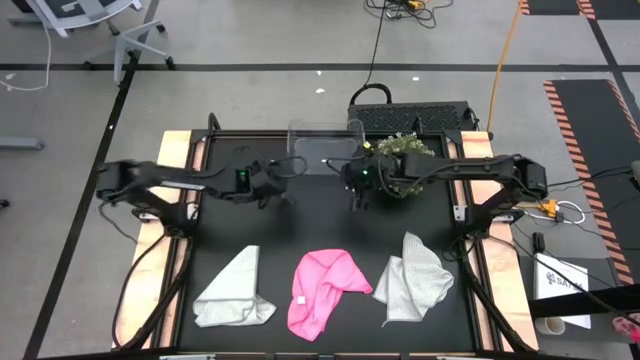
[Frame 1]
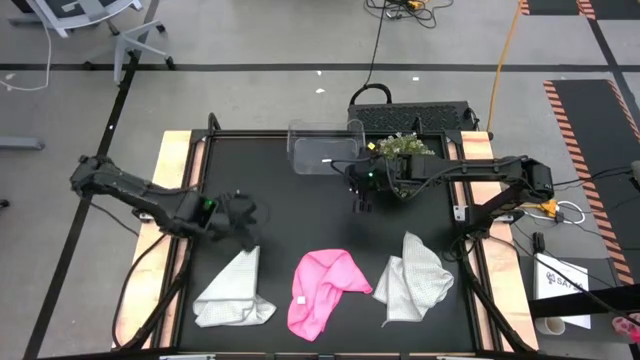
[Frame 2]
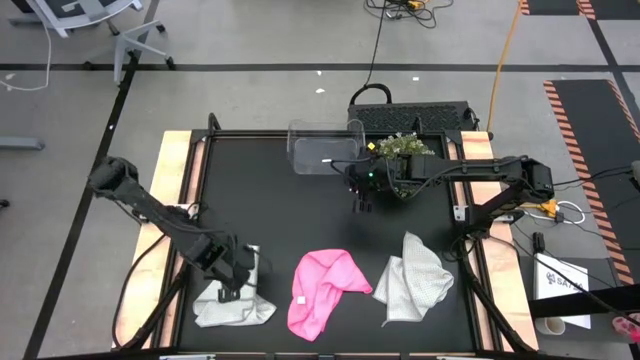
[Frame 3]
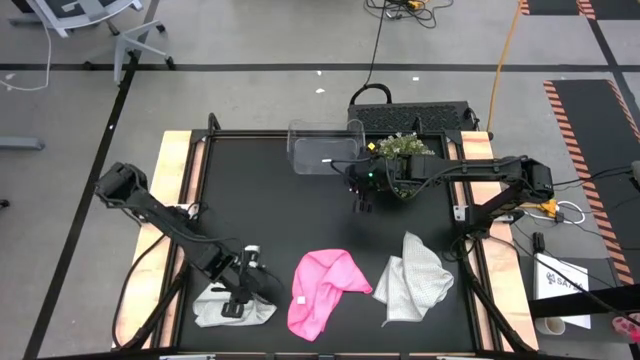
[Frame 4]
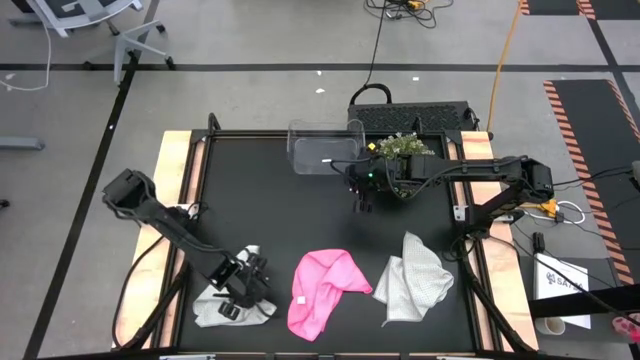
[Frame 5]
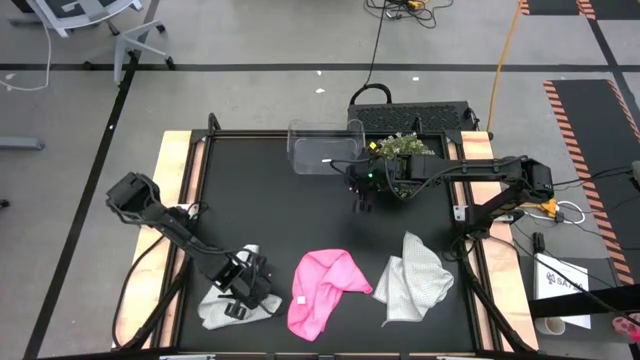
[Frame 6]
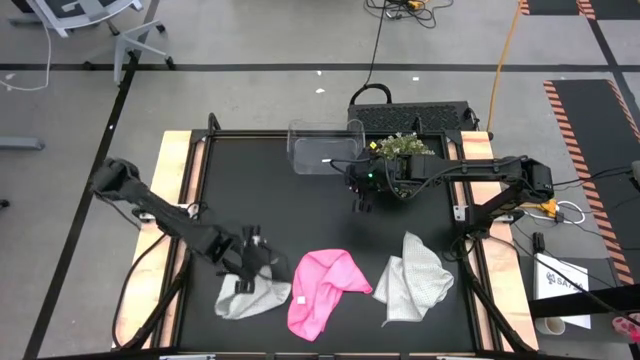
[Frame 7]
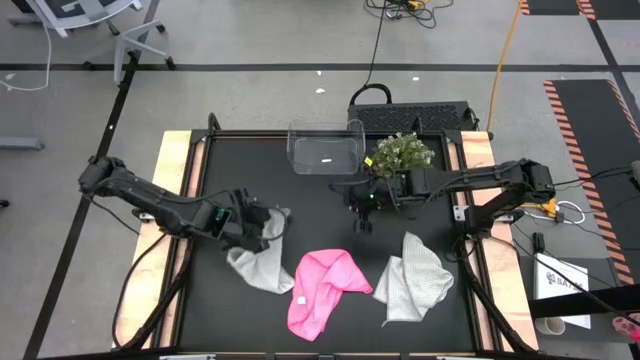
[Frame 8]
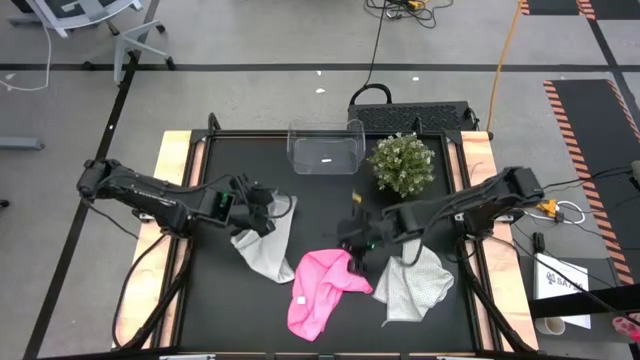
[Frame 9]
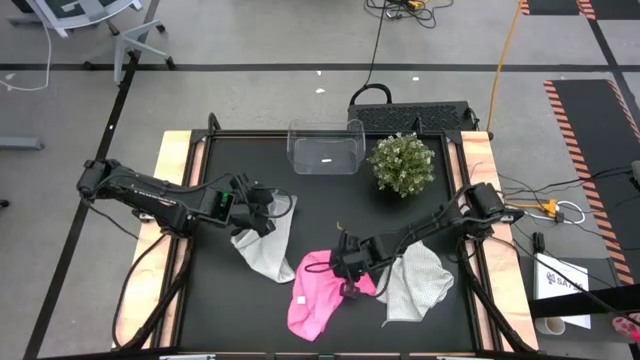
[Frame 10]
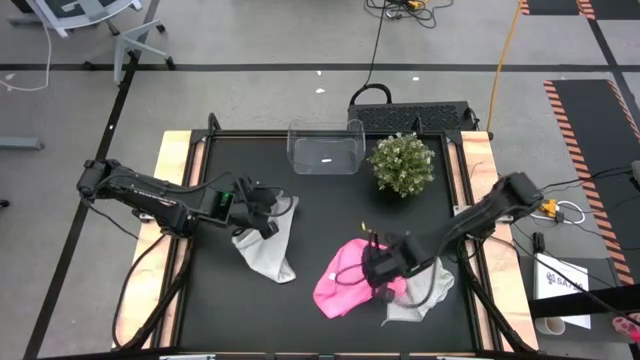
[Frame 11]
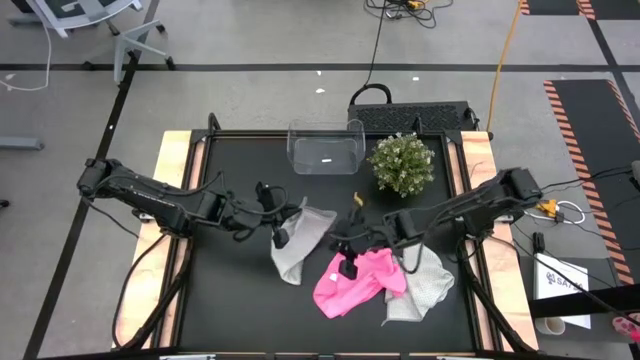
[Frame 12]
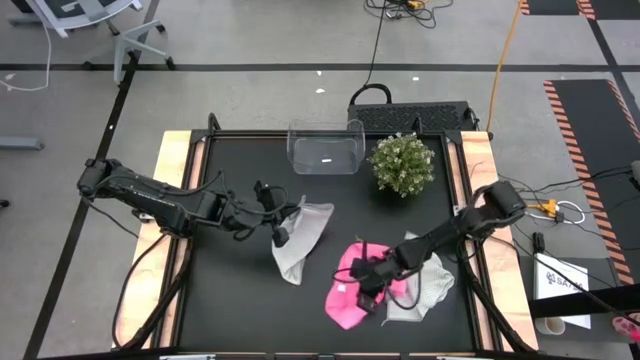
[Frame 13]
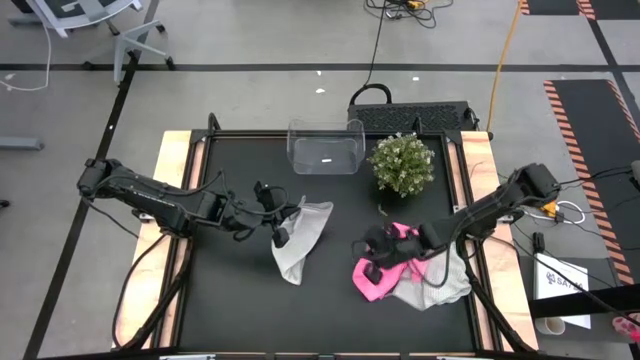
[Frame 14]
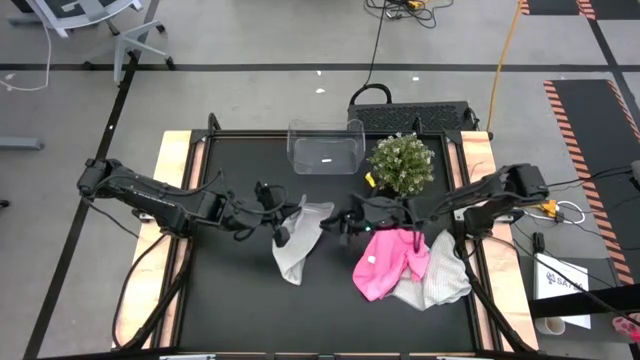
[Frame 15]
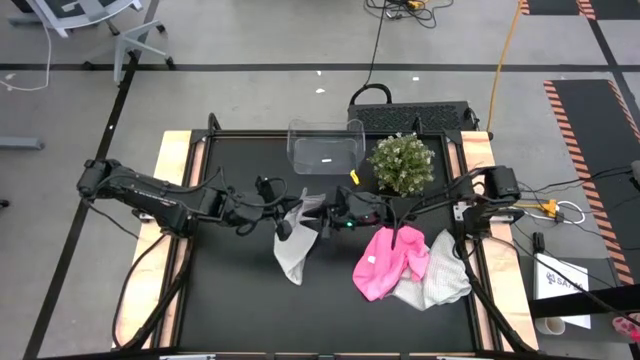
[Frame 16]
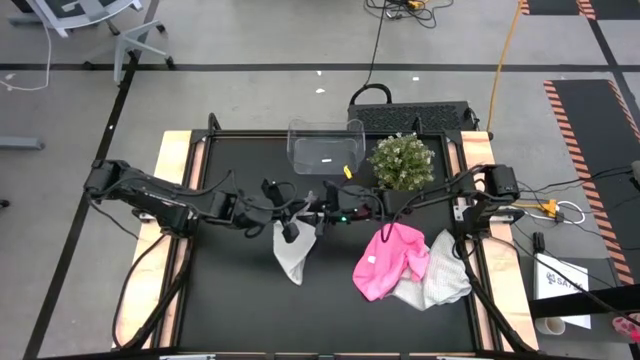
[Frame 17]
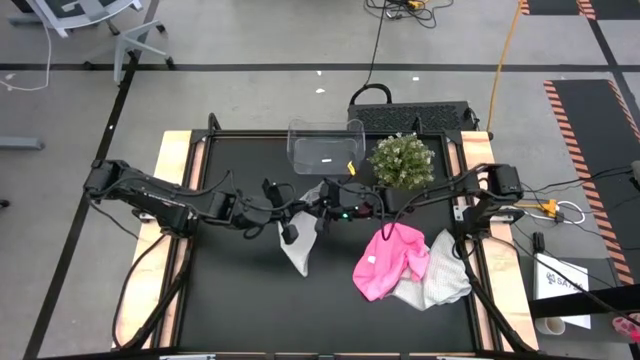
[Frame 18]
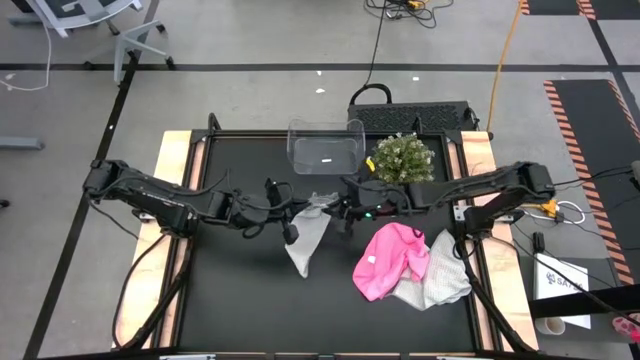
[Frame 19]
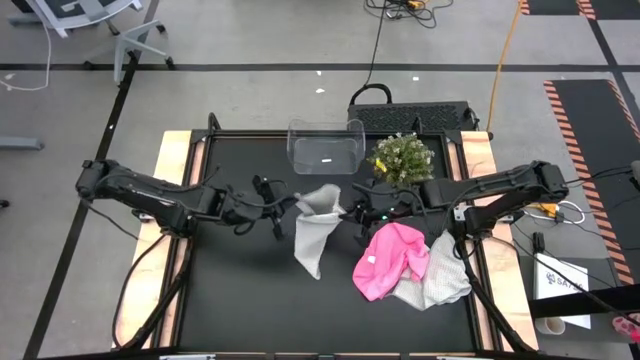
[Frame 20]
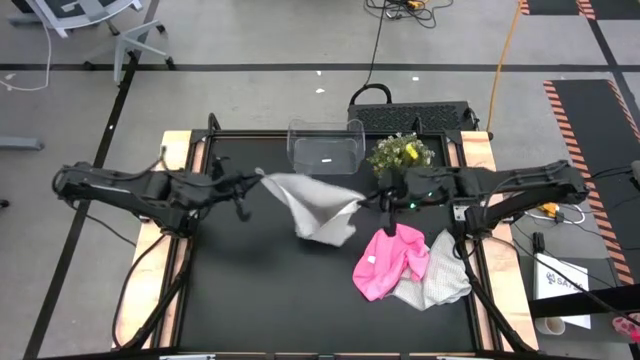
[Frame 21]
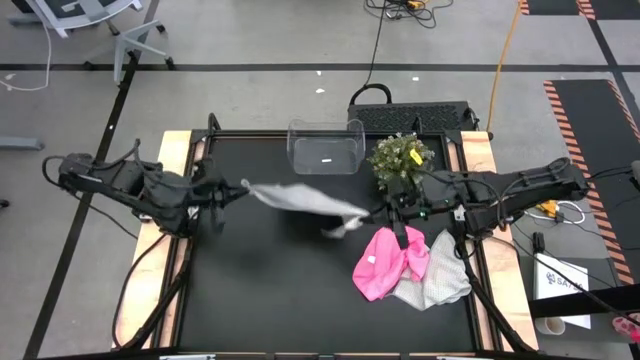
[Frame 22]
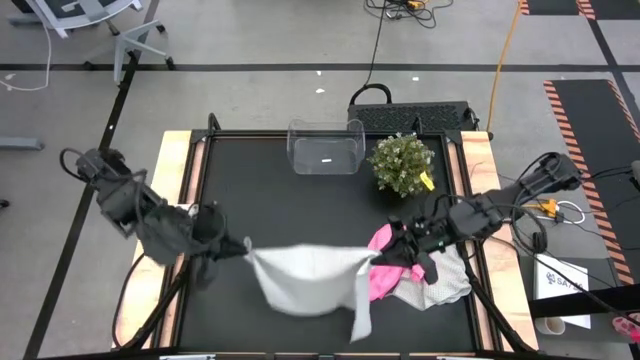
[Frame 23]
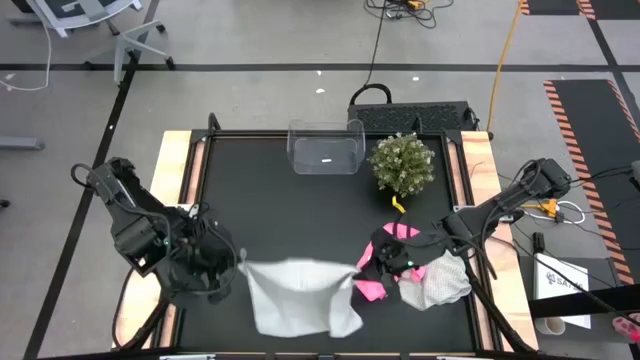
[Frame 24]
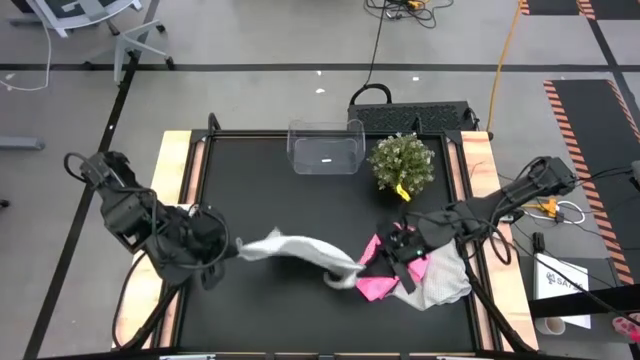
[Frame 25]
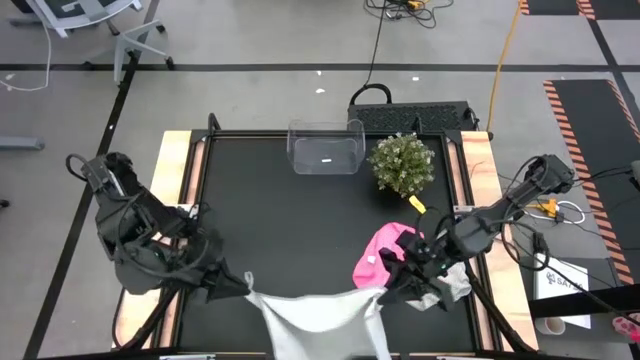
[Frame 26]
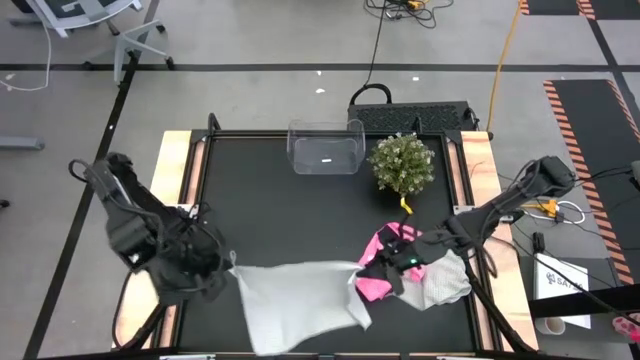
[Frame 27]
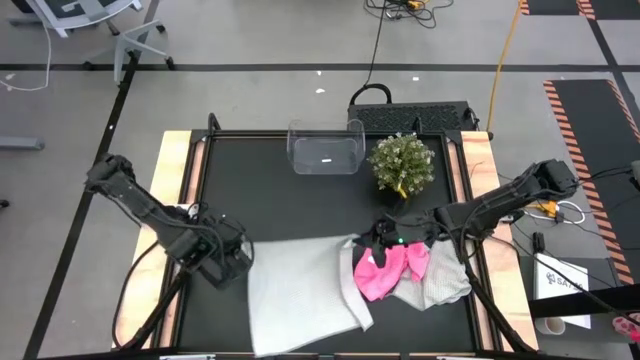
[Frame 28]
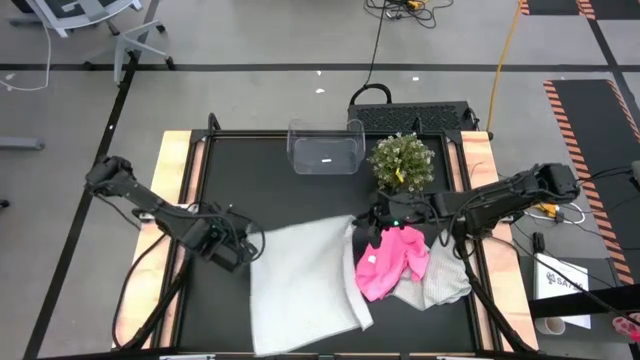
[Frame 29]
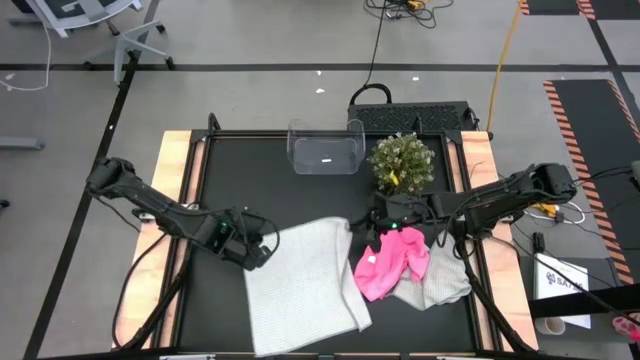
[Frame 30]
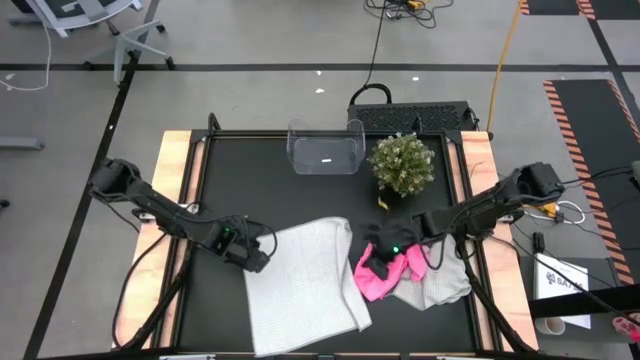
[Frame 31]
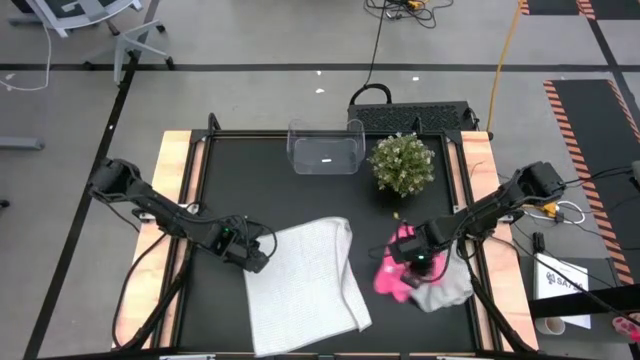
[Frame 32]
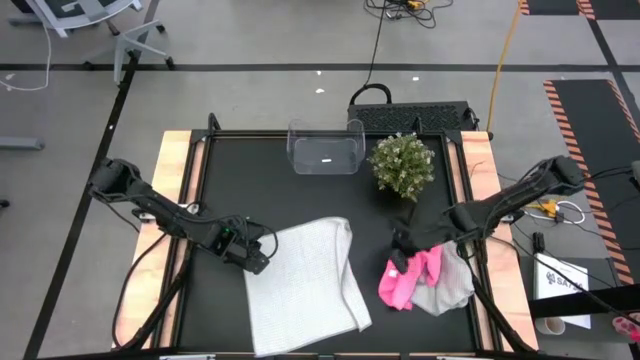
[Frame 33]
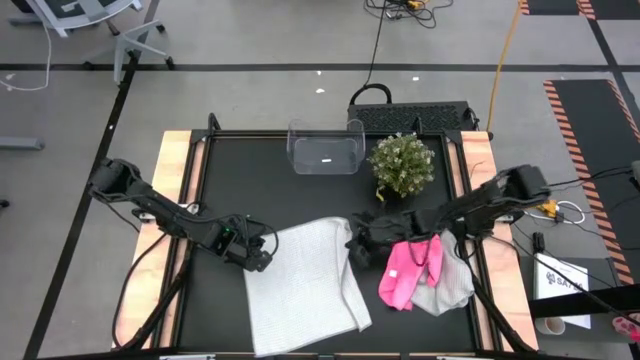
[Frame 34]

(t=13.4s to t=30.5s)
Task: Fold microfiber towels
Fold the left gray towel

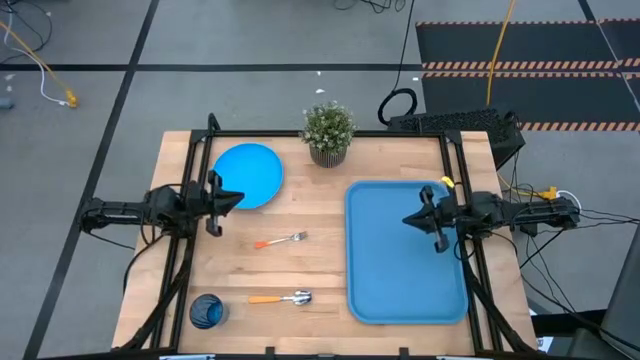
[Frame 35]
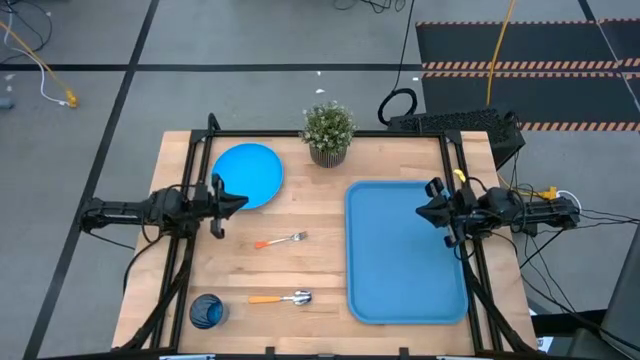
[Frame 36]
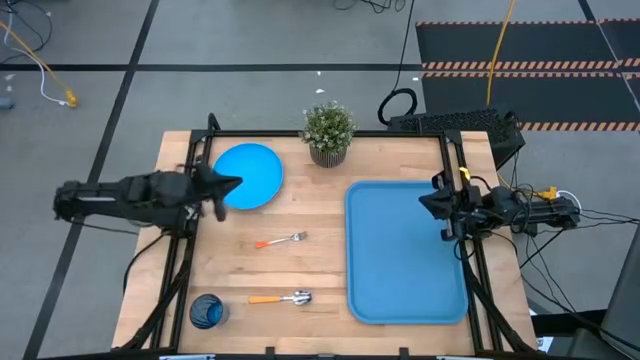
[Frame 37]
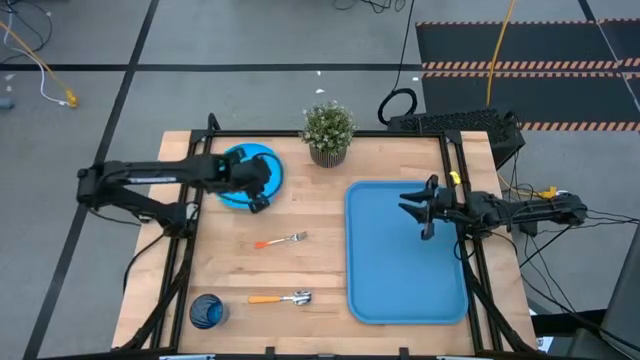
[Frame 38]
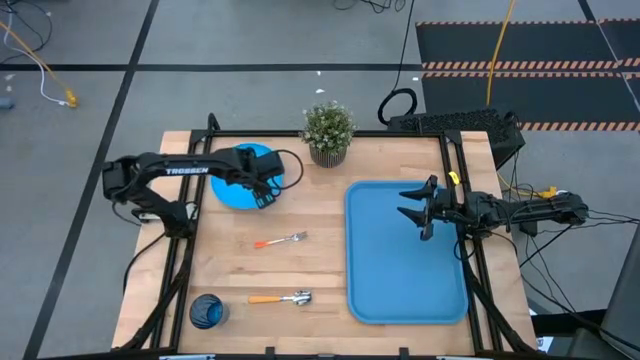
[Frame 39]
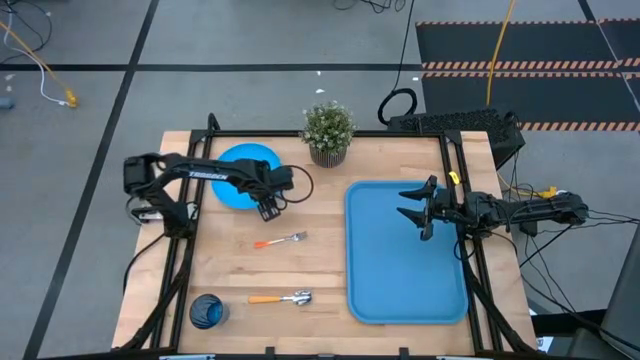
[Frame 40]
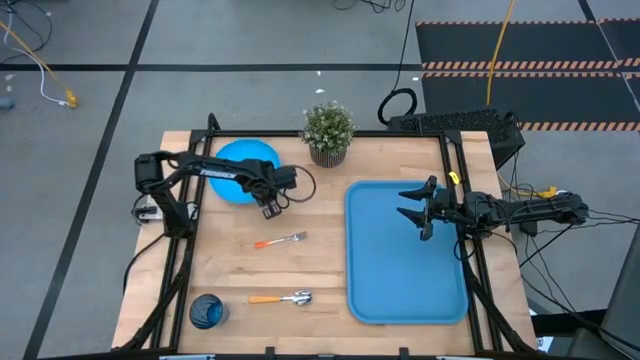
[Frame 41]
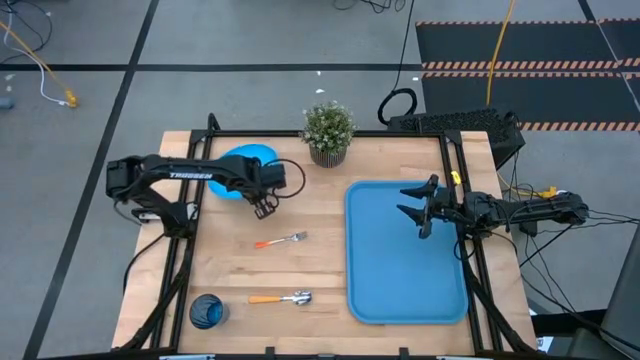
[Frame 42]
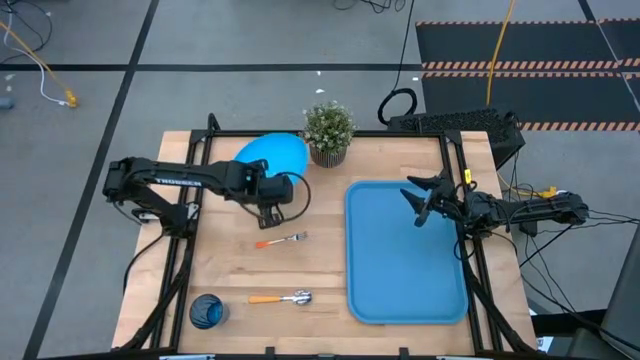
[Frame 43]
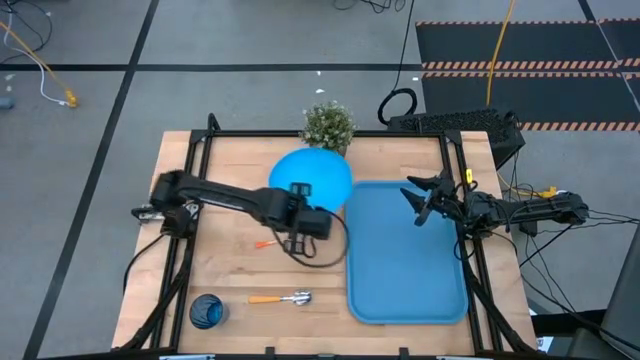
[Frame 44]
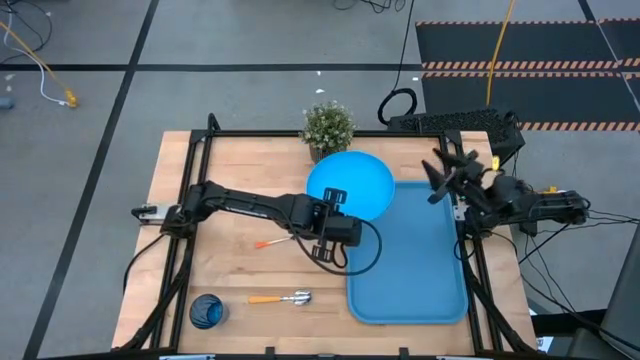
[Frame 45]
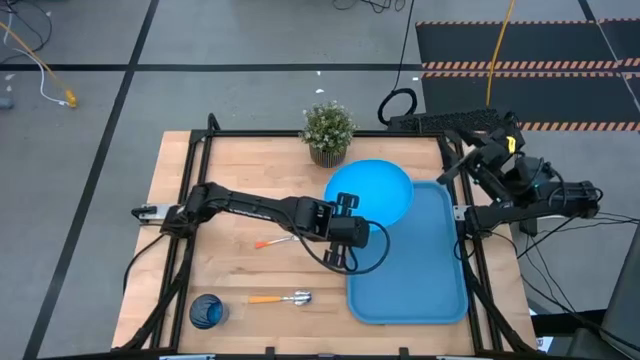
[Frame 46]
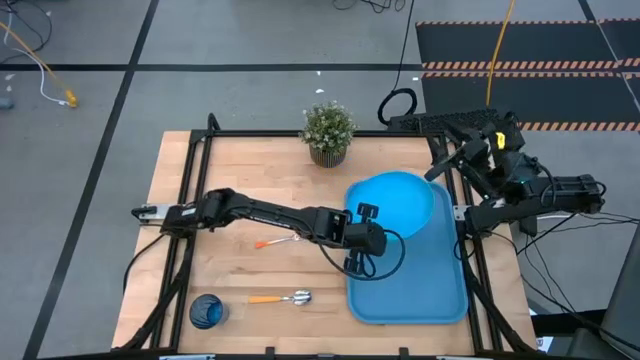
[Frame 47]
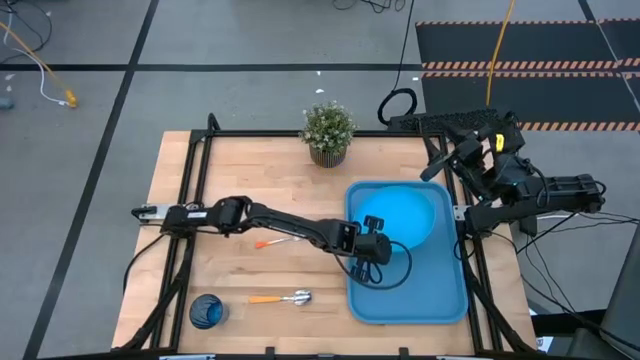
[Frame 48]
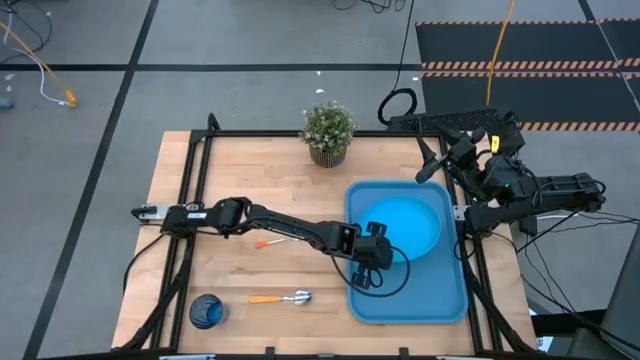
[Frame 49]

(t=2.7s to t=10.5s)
Task: Pick and place plate/cup/fork/spoon on tray
Put the blue plate on the top of the blue tray
